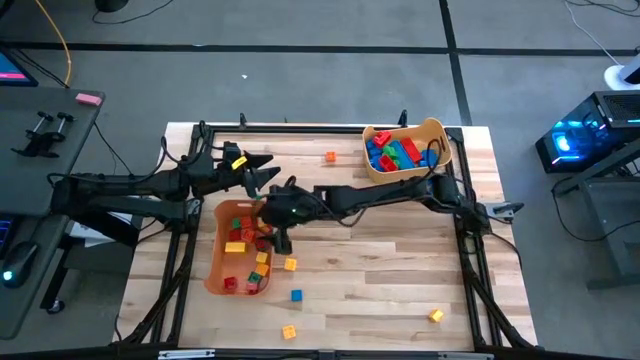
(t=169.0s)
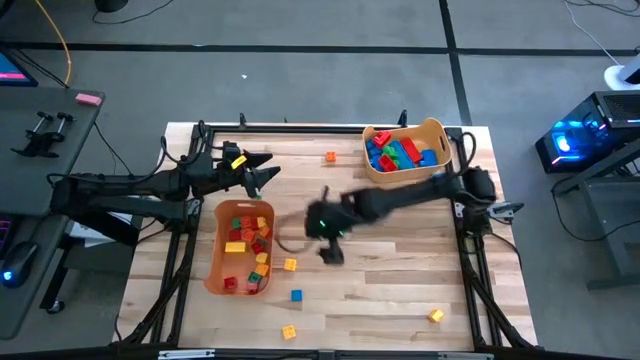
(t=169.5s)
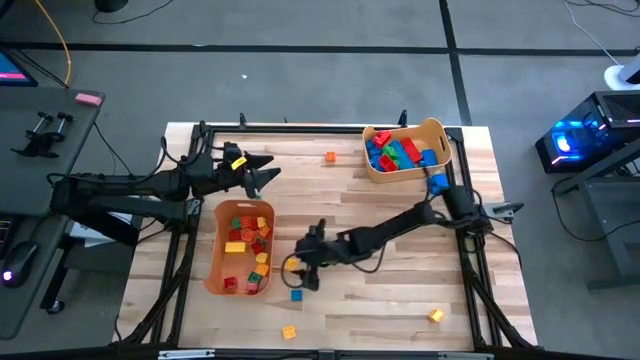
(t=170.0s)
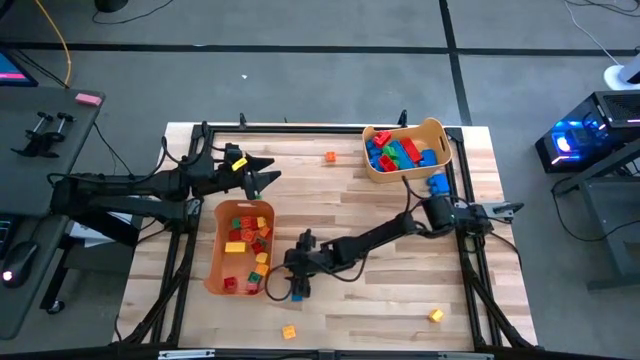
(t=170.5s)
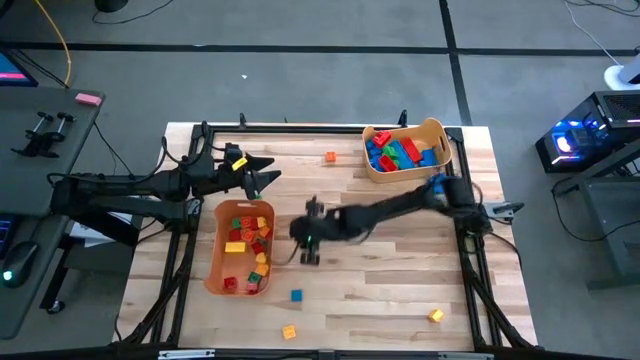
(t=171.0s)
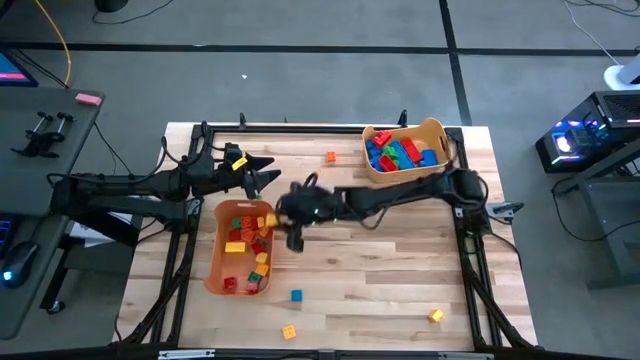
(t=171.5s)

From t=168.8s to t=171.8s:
Task: Sort blocks by size
Put the yellow game piece into the orange bin

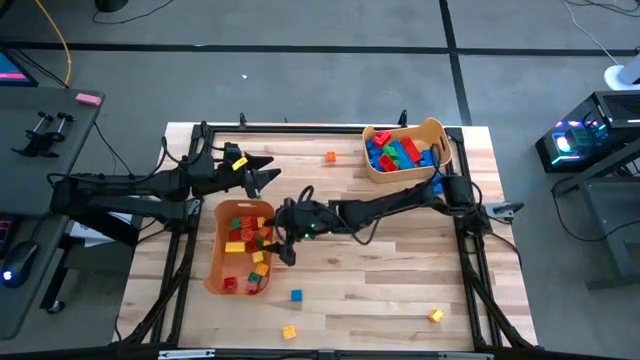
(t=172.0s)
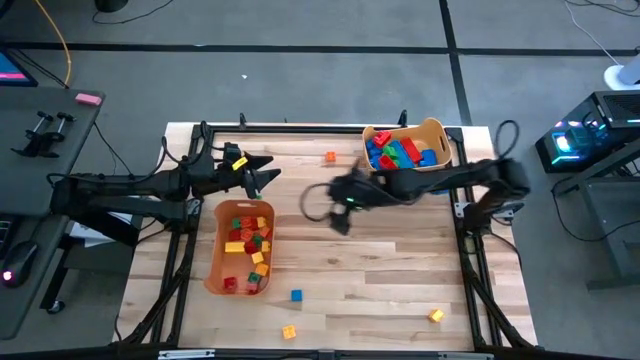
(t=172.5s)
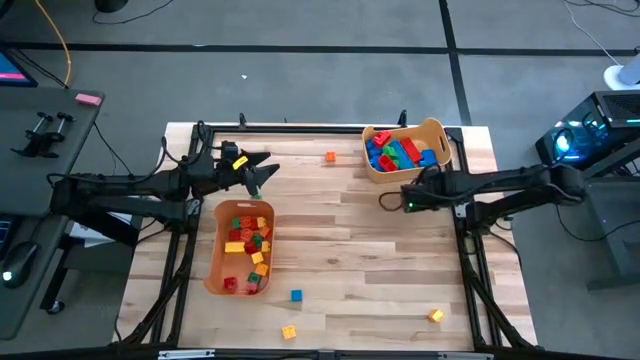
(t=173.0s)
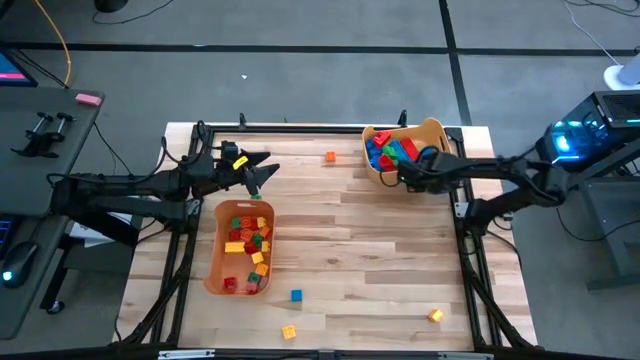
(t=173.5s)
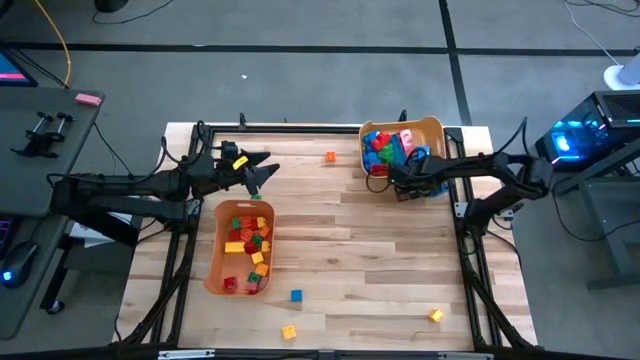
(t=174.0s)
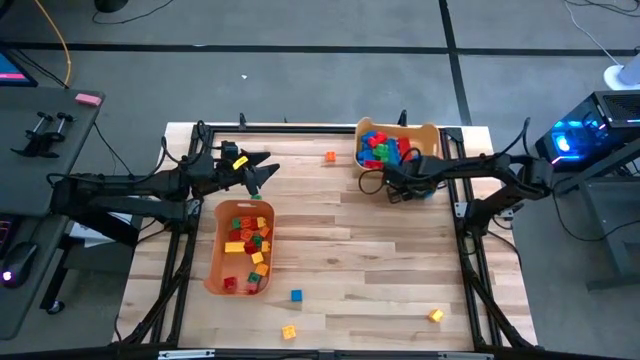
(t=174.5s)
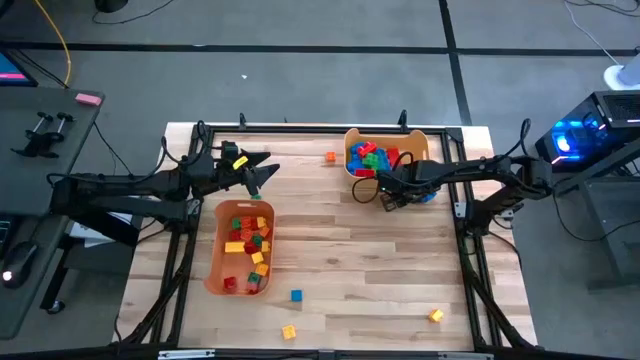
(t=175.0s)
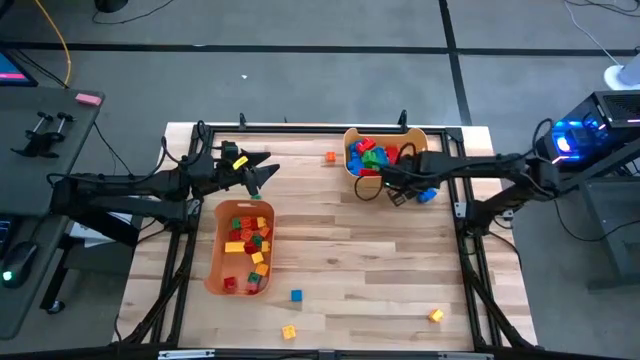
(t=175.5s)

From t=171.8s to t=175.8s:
Adjust the yellow bin

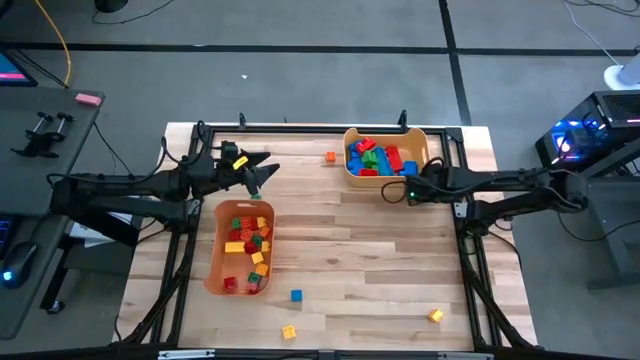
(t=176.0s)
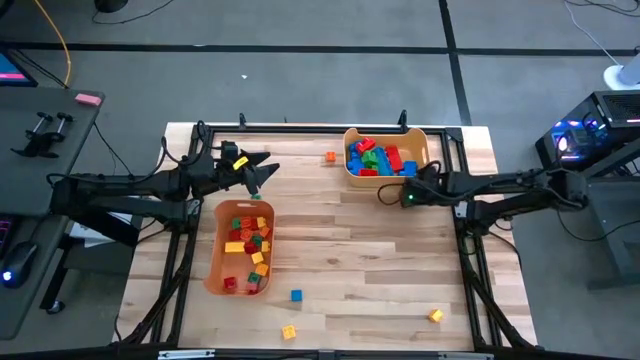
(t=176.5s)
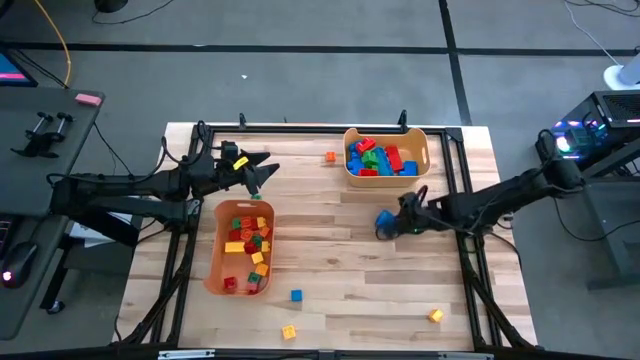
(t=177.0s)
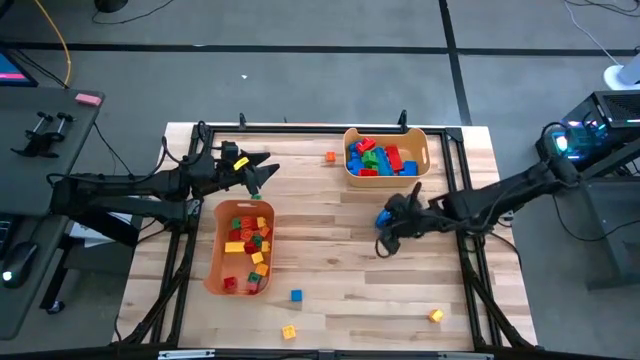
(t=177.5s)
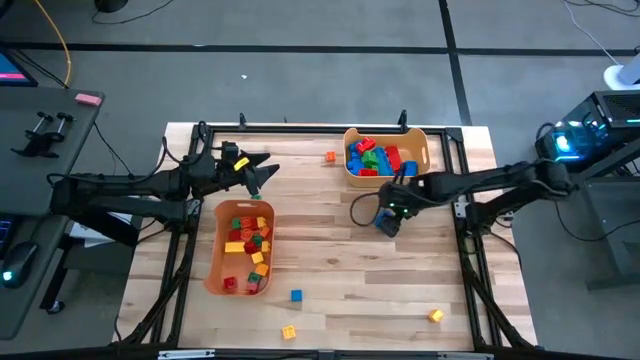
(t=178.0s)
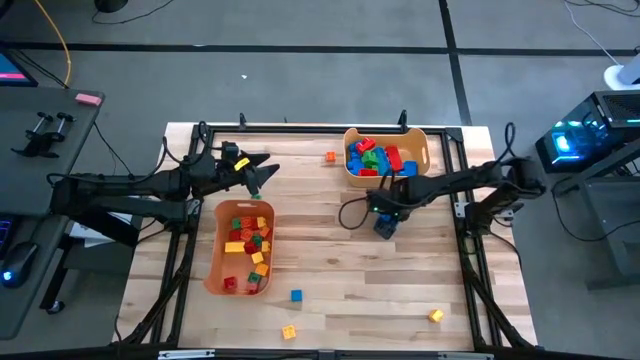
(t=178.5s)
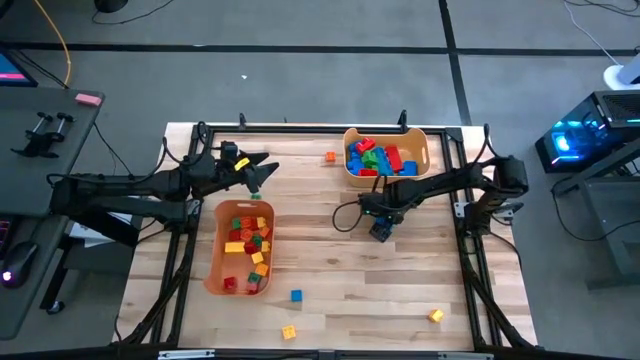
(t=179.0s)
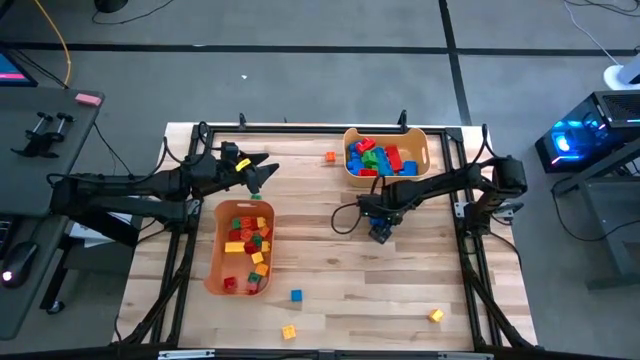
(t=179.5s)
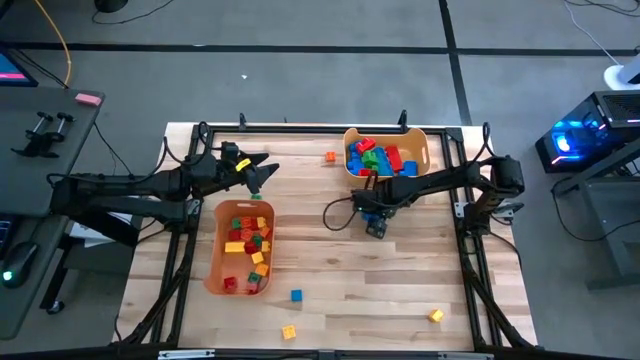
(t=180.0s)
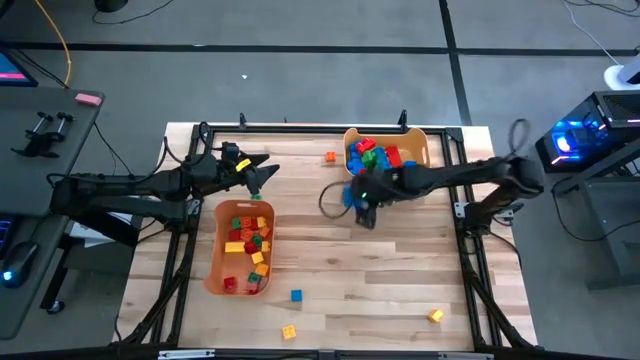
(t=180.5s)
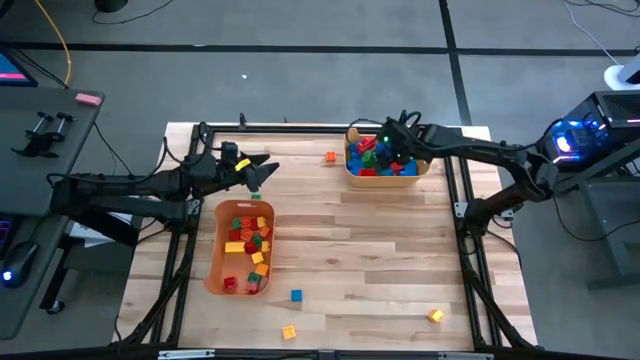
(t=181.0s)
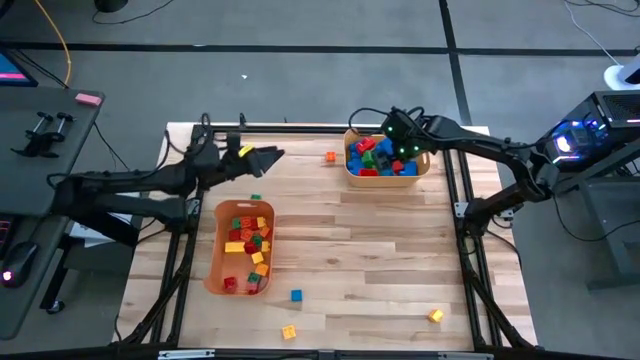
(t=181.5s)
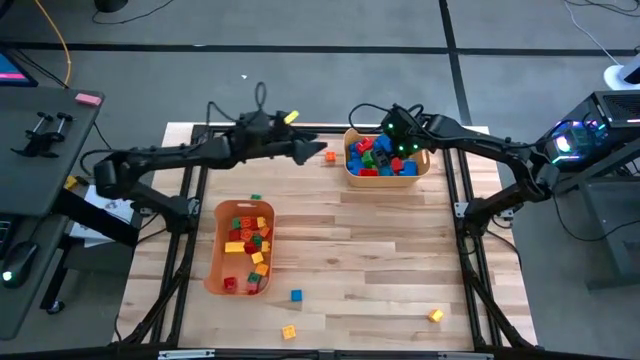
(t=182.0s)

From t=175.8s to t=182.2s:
Put the blue game piece into the yellow bin

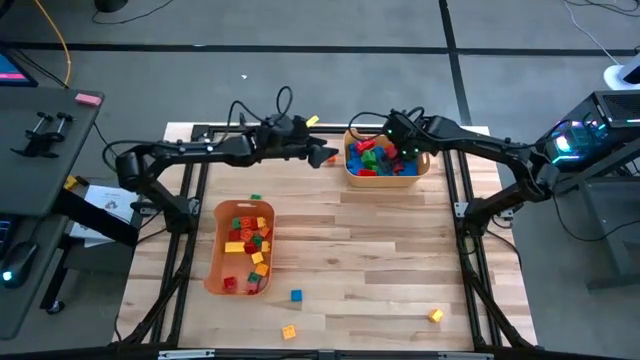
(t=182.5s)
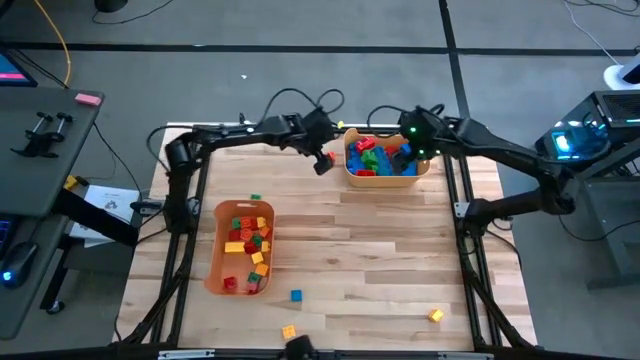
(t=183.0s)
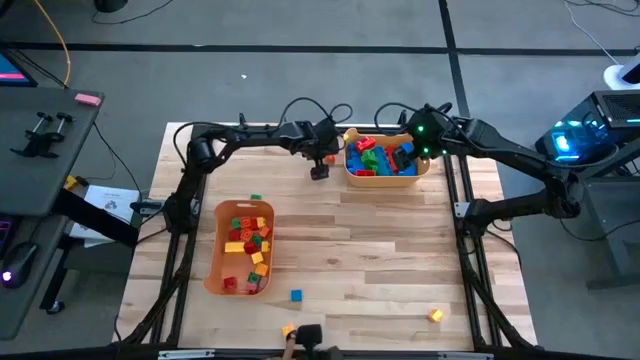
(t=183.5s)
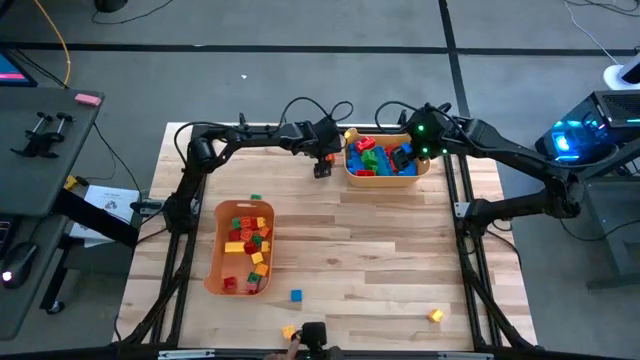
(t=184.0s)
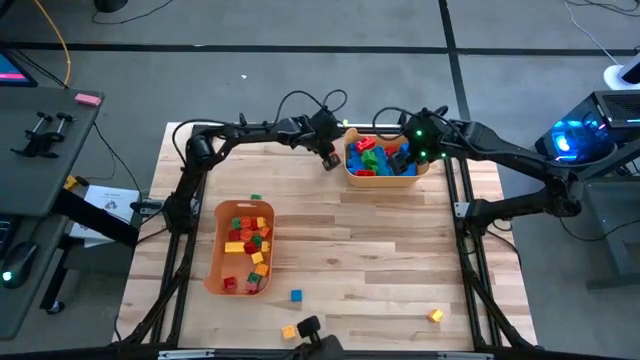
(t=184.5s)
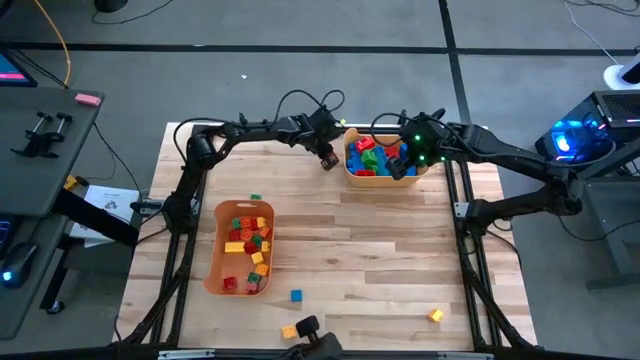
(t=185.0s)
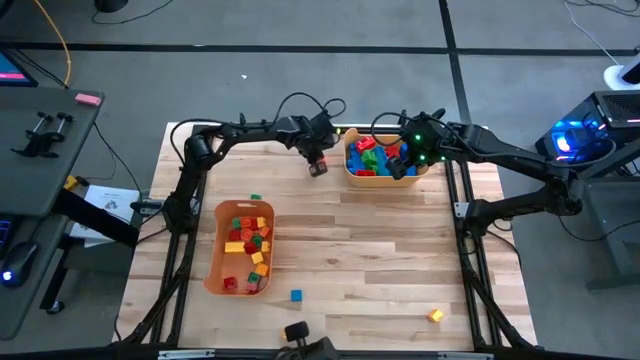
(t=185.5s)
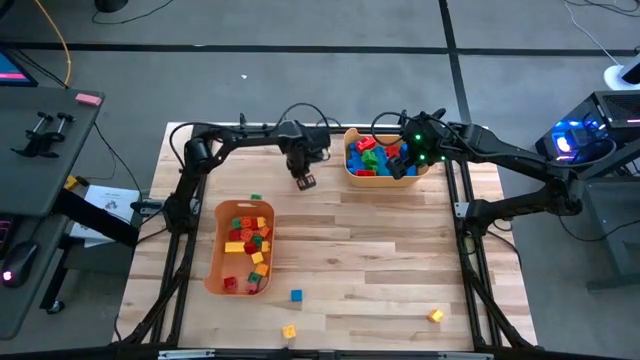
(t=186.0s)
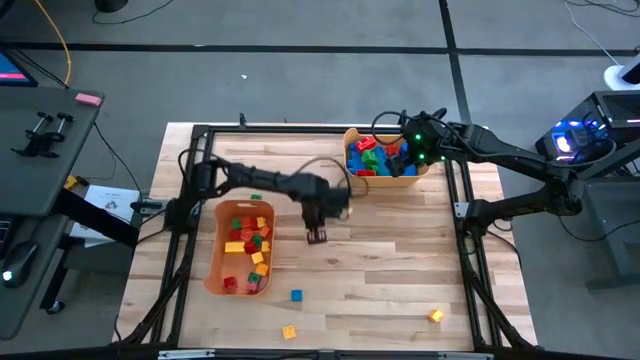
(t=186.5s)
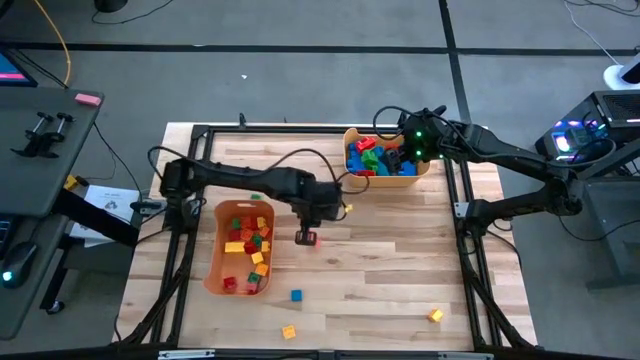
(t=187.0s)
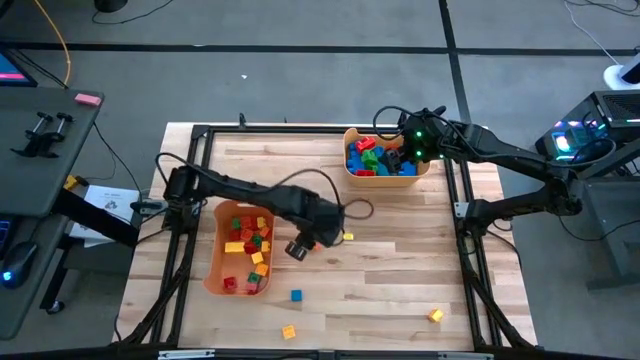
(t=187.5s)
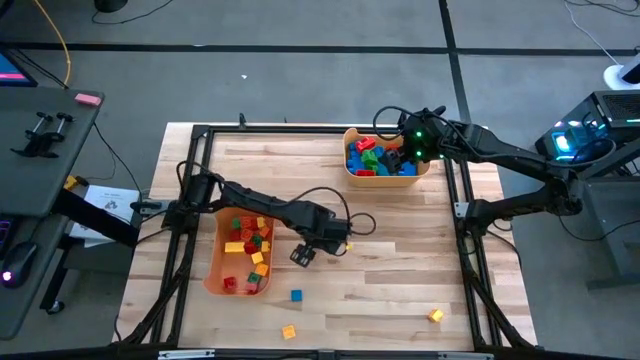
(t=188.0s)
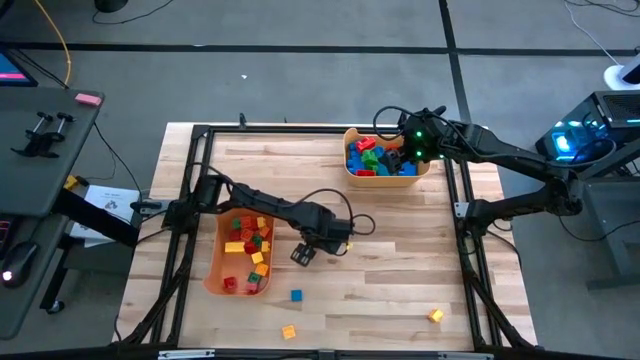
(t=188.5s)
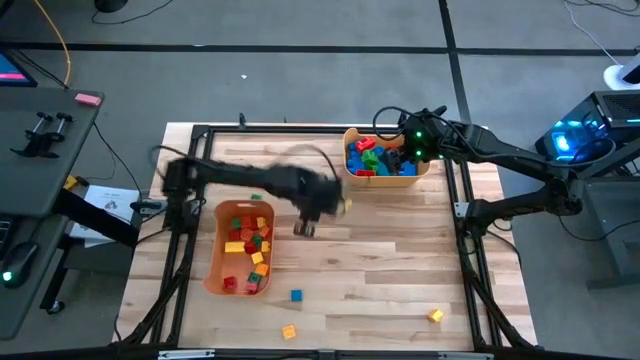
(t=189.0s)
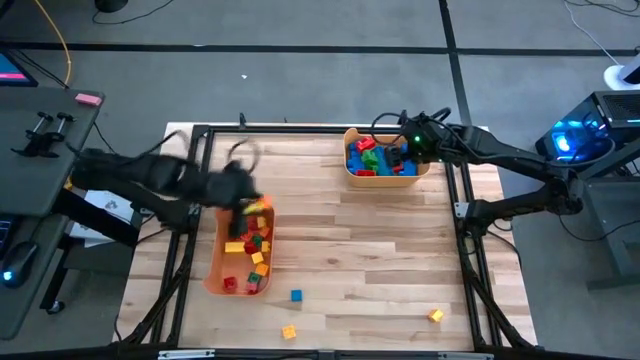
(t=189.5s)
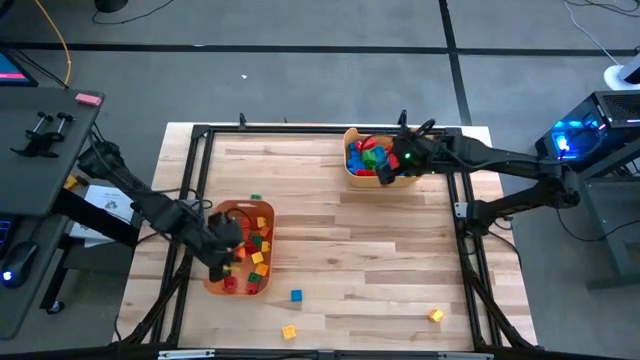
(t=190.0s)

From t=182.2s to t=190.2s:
Put the orange game piece into the orange bin
